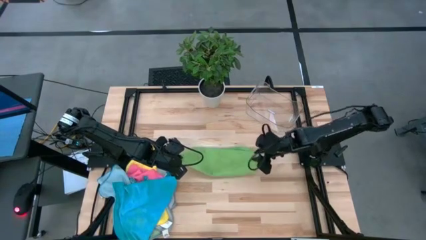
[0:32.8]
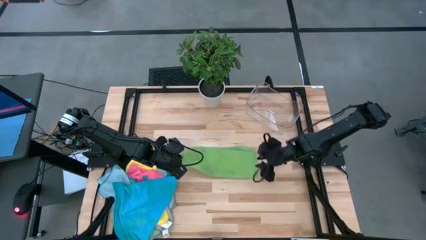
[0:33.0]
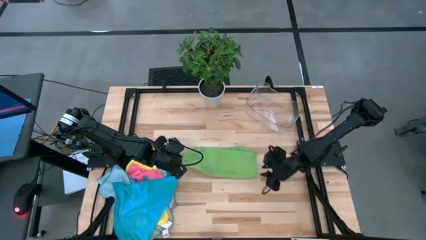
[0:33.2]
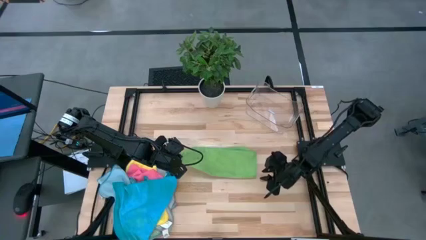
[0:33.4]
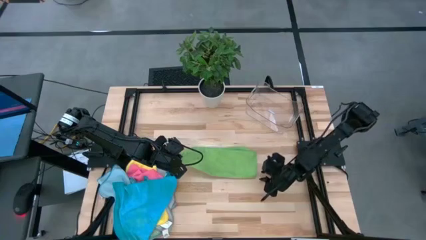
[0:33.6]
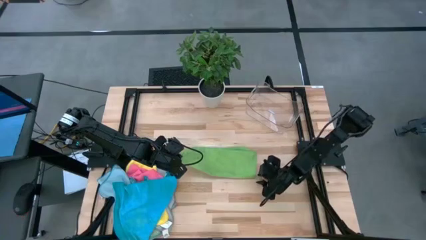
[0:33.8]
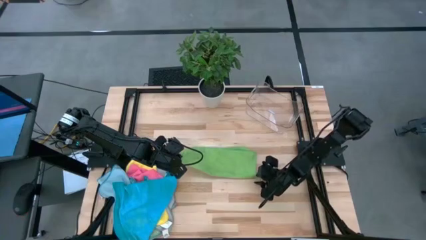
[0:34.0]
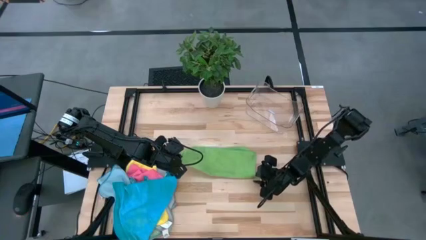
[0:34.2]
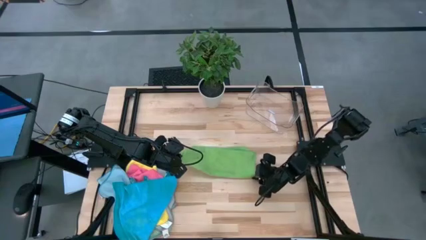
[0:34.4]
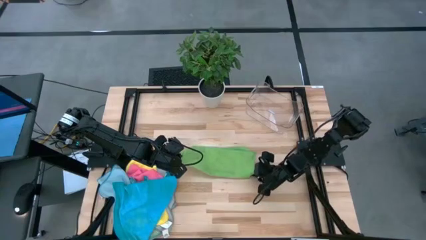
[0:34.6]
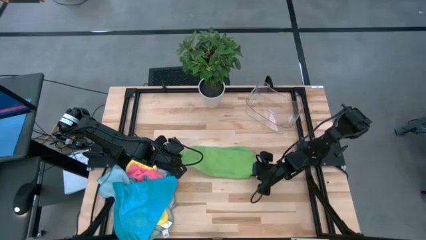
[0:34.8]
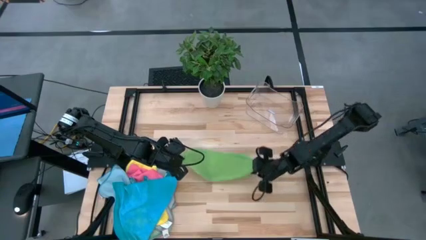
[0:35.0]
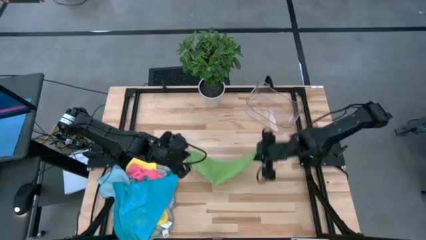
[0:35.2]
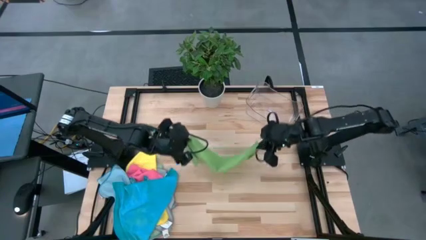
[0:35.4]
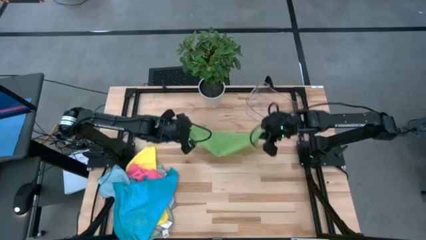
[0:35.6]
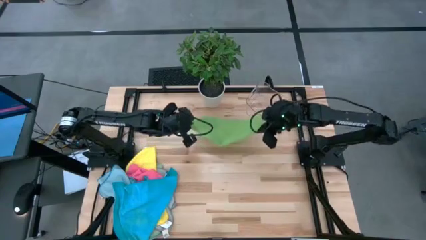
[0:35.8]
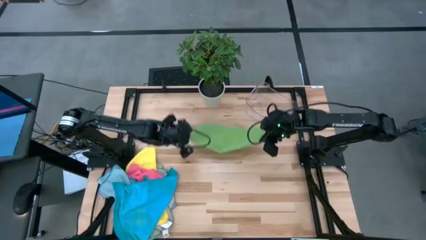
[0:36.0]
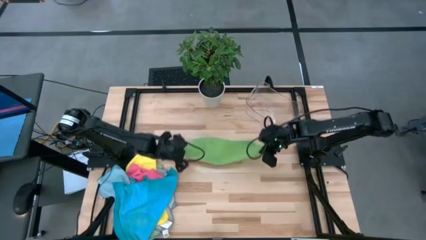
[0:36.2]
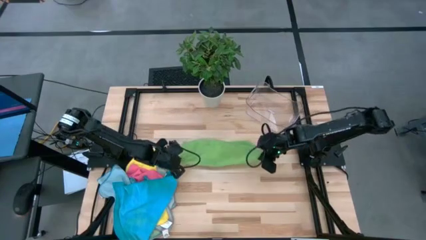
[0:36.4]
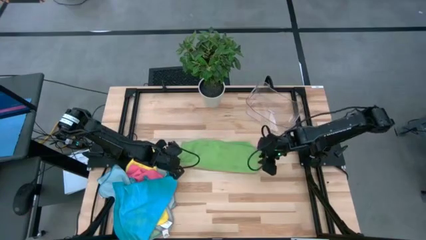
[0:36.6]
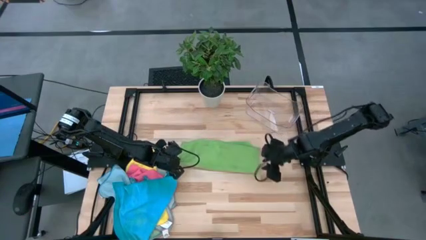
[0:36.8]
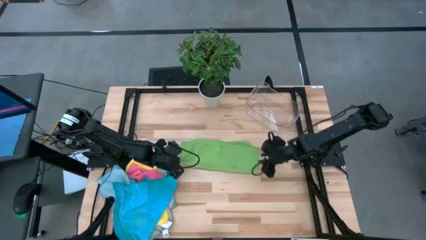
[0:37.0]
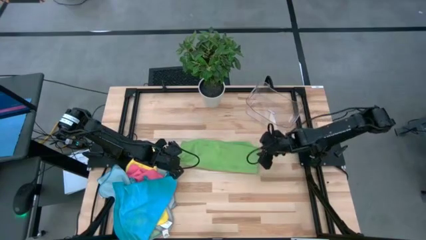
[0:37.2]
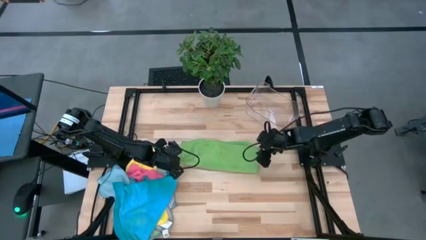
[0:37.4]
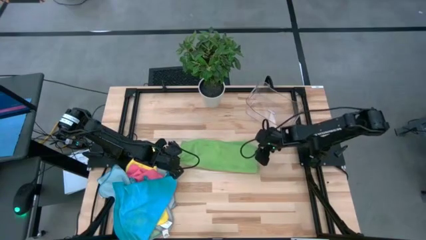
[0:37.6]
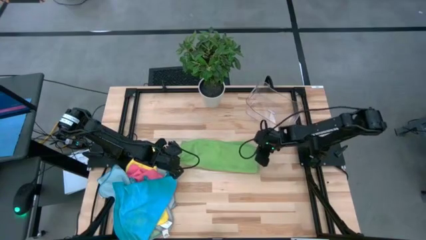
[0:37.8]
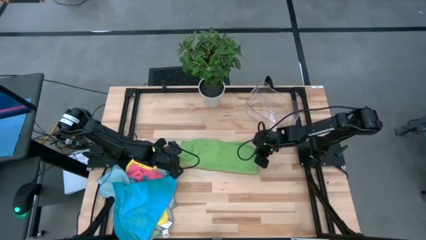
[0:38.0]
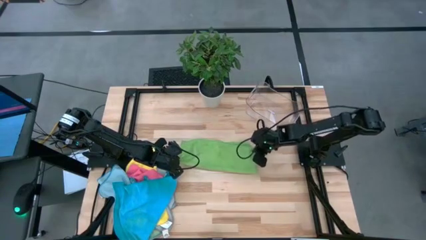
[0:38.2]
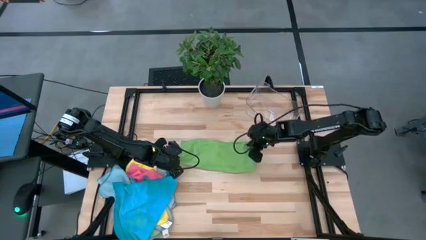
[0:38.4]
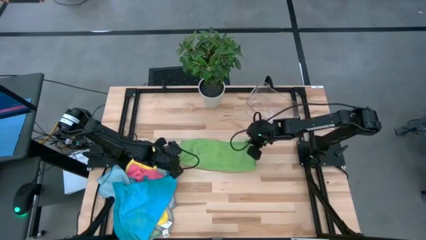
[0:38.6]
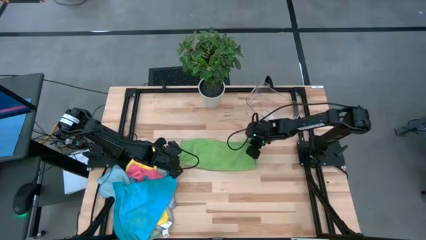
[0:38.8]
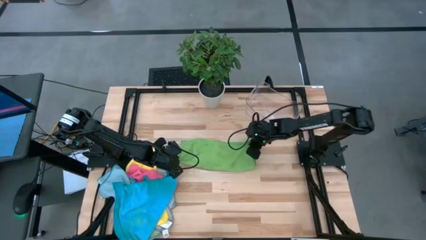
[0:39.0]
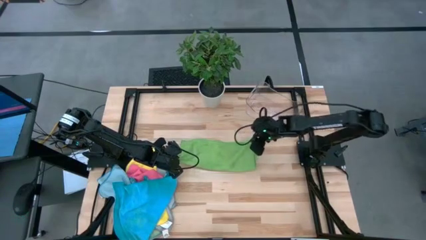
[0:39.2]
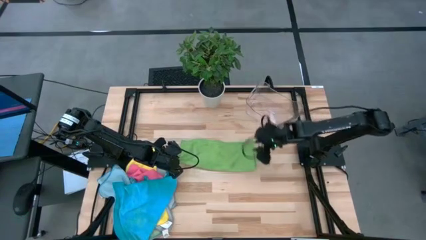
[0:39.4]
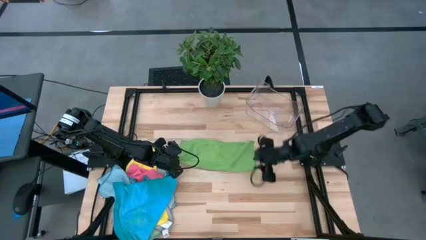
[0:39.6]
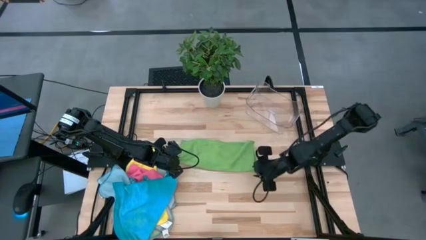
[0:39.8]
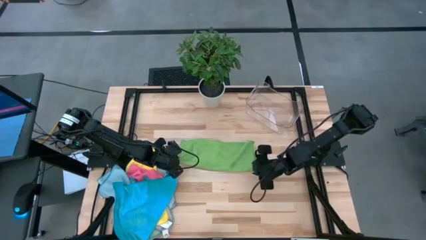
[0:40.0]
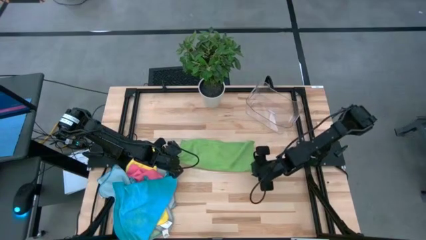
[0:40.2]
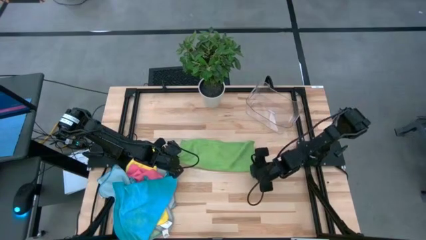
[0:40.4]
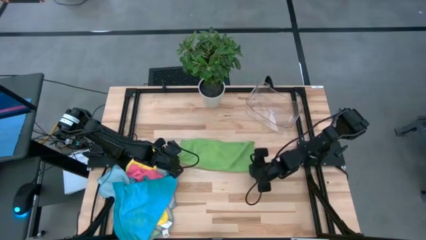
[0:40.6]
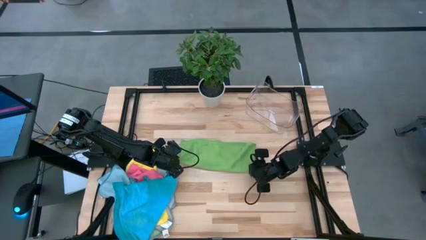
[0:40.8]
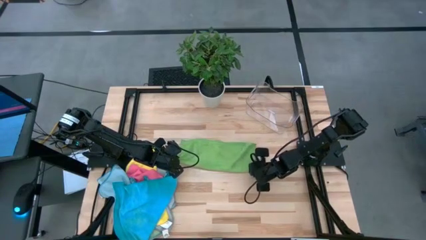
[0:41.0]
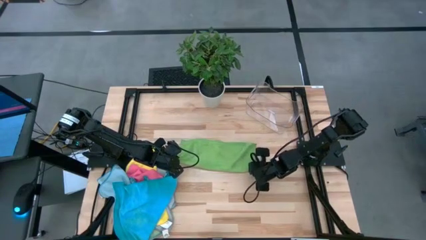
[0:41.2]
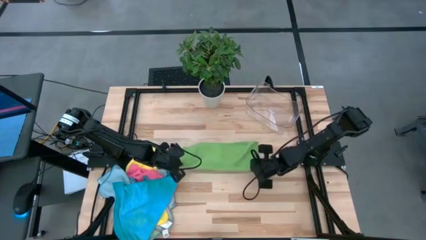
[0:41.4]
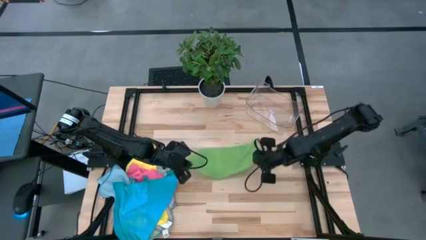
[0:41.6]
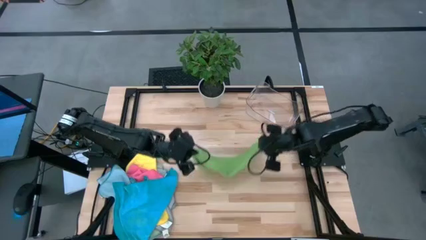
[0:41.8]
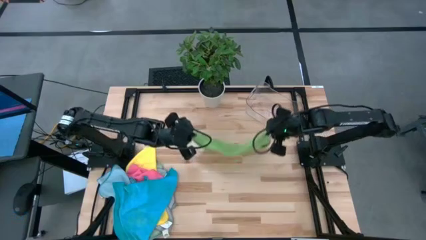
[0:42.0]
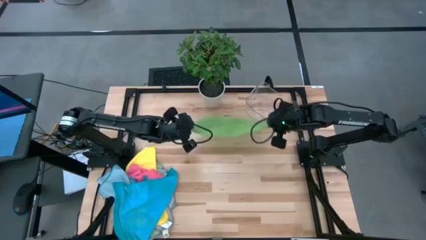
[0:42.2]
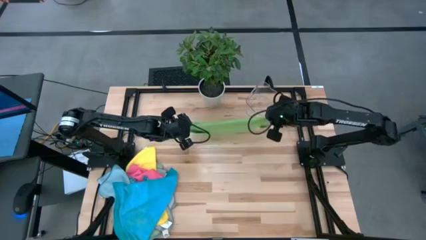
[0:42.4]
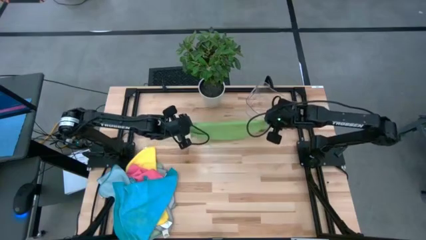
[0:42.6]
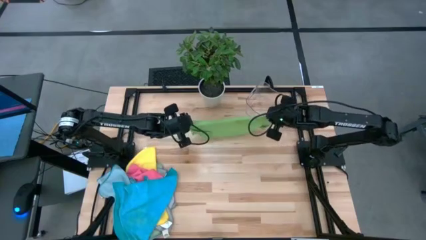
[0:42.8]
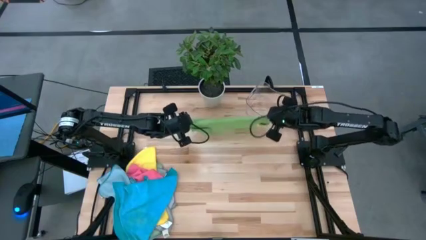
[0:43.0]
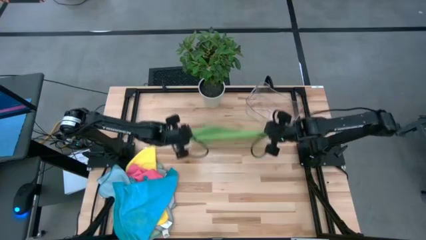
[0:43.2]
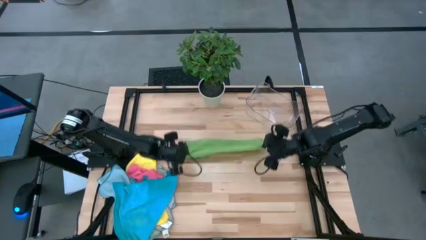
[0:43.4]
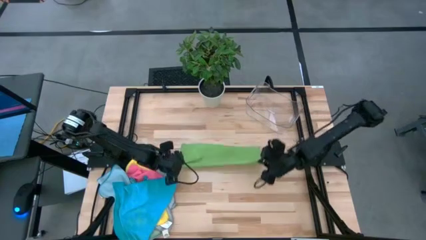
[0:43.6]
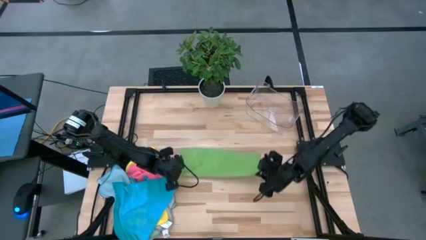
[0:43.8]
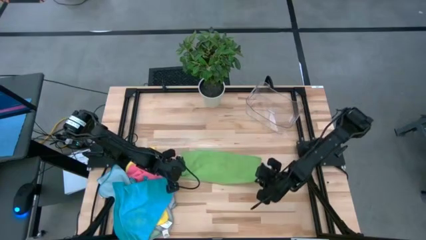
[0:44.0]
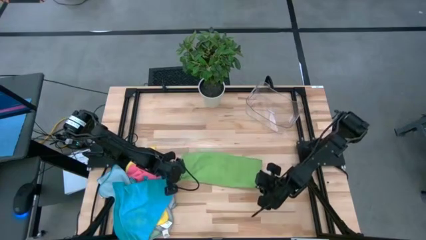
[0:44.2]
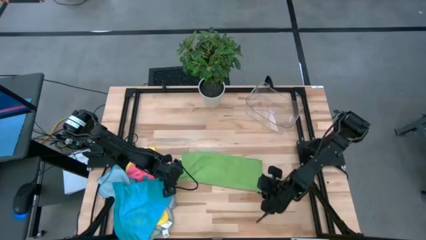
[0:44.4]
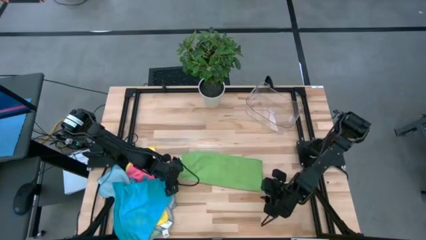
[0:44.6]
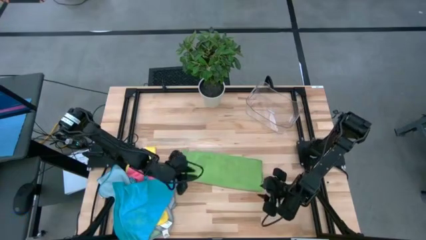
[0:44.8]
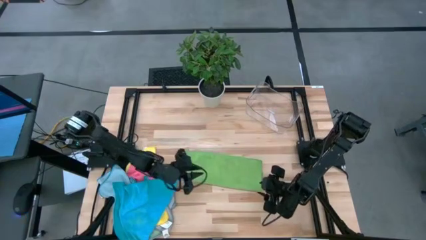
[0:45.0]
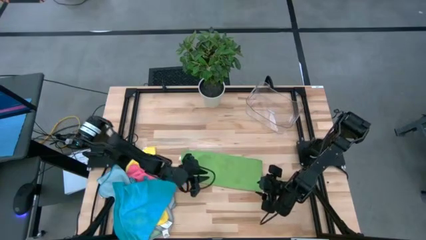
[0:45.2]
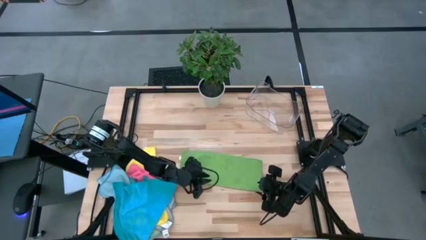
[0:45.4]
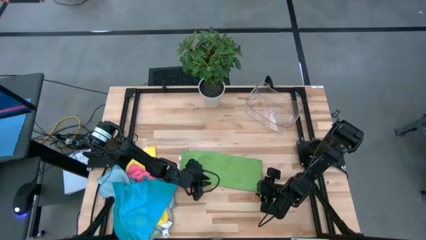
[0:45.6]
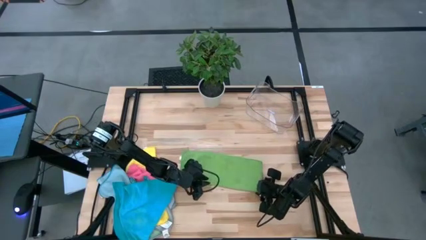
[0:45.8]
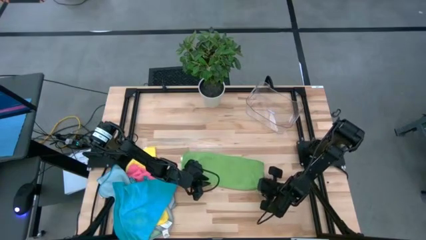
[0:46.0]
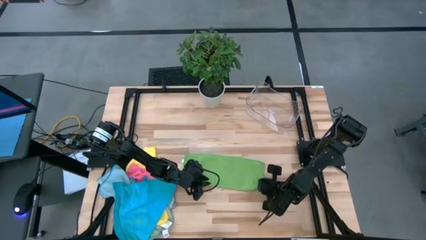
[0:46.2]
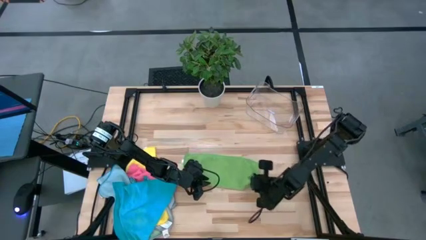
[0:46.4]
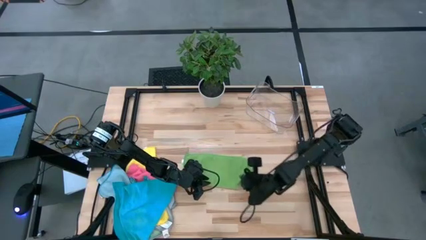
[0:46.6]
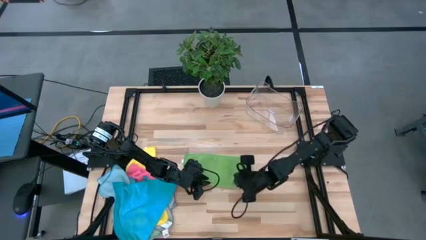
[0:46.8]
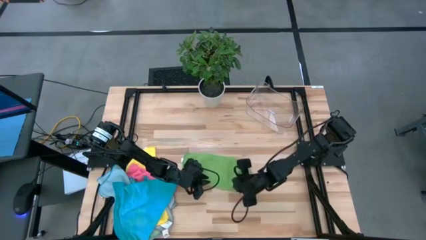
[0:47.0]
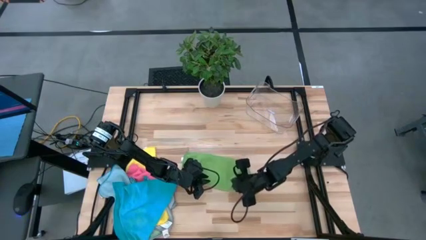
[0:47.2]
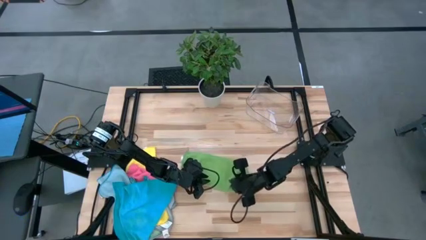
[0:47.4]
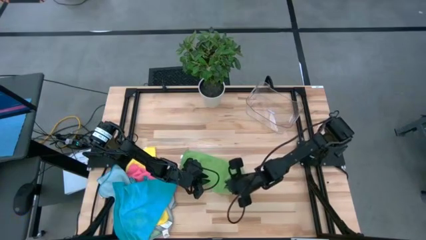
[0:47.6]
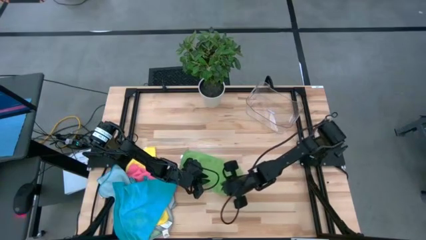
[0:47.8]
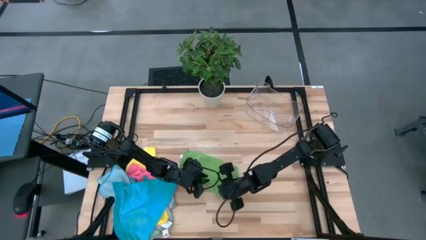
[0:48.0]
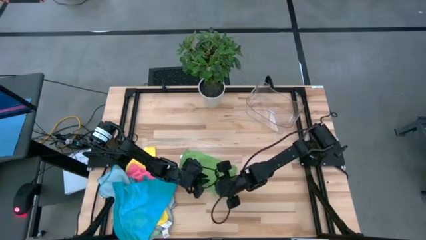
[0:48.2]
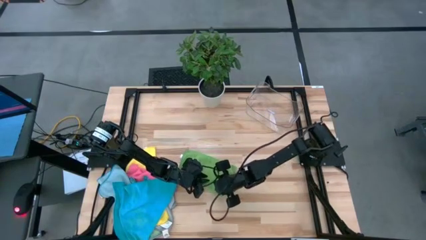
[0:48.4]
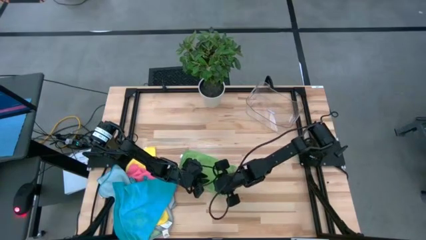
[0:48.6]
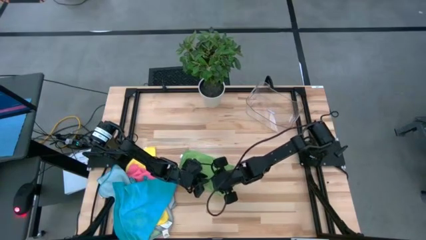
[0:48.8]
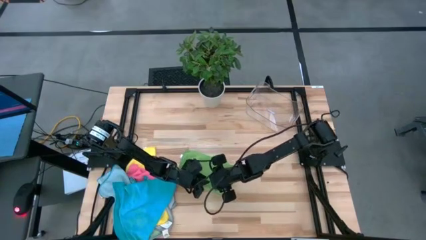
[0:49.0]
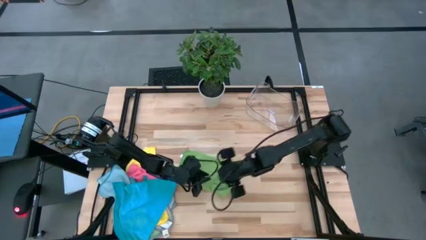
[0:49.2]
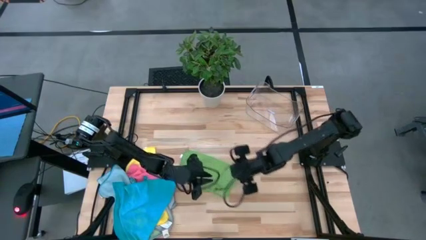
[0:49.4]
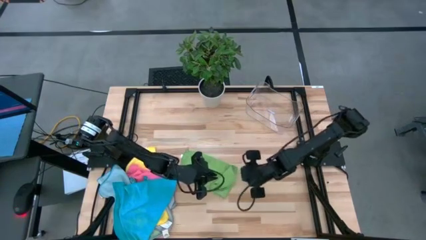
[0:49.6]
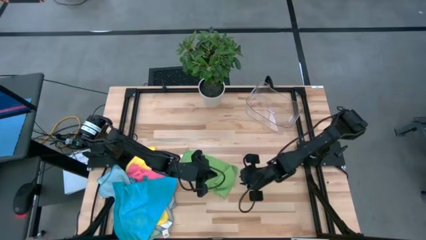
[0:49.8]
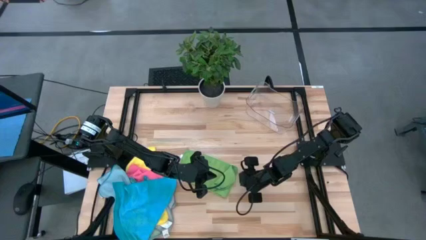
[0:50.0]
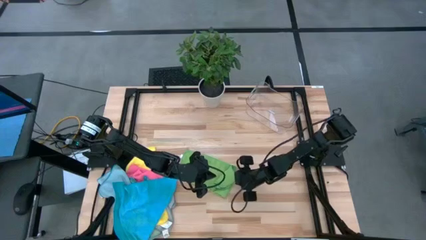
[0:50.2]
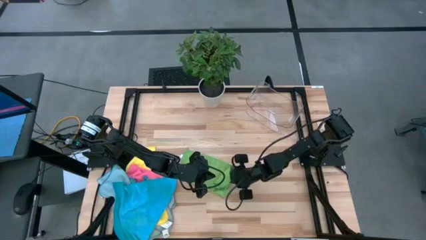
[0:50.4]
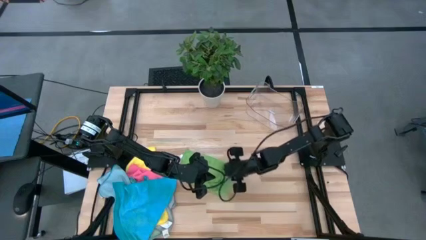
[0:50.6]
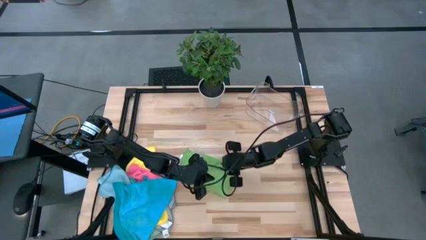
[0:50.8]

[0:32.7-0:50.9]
Task: Fold microfiber towels
Fold the green microfiber towel
